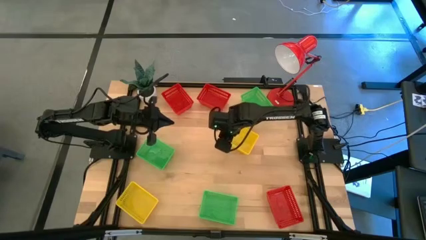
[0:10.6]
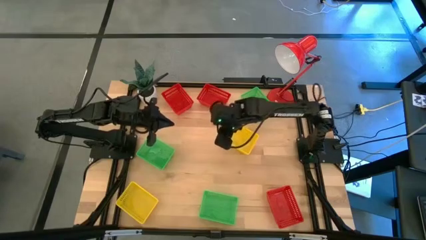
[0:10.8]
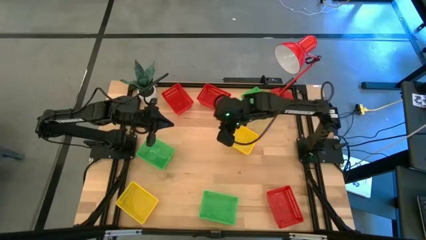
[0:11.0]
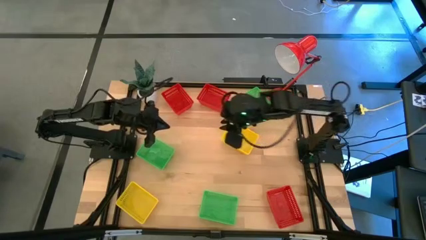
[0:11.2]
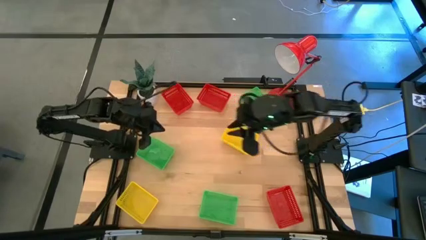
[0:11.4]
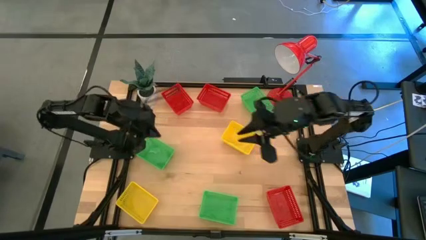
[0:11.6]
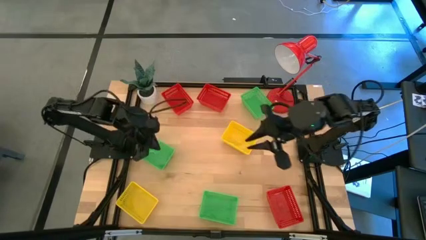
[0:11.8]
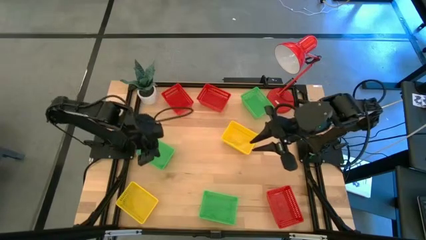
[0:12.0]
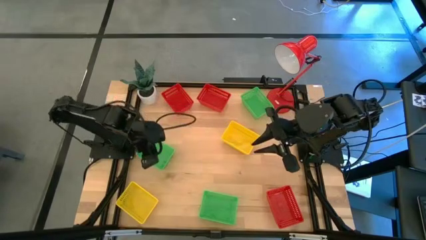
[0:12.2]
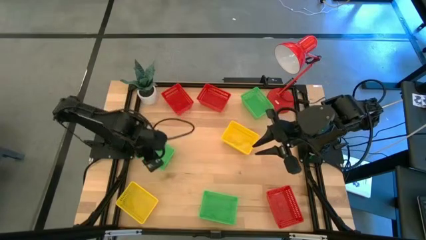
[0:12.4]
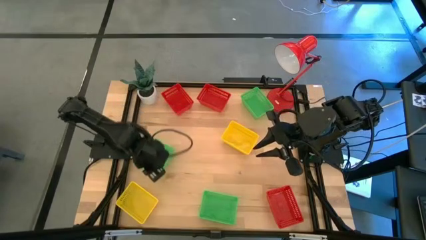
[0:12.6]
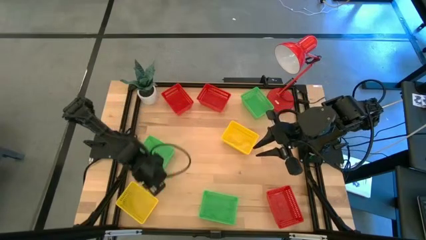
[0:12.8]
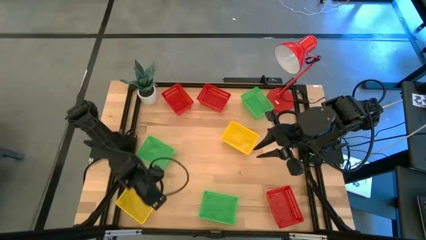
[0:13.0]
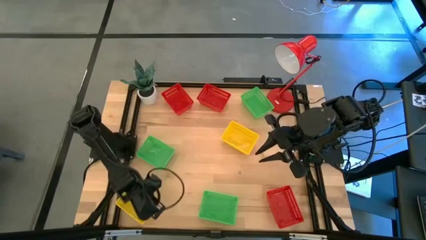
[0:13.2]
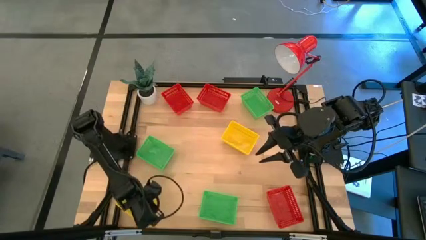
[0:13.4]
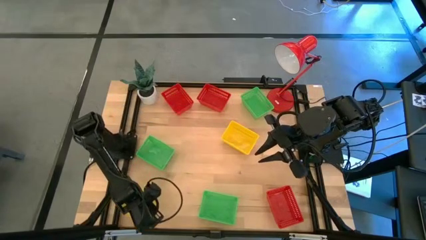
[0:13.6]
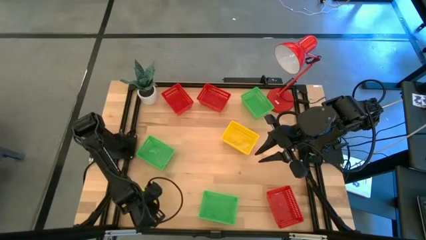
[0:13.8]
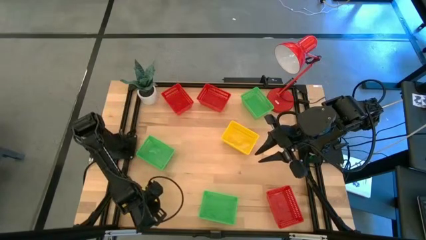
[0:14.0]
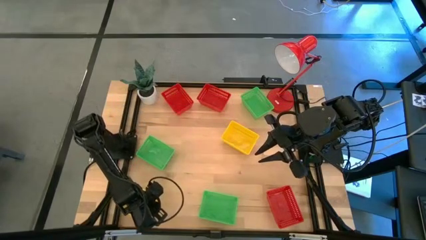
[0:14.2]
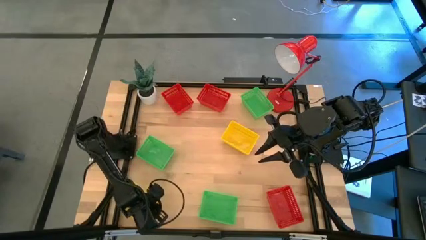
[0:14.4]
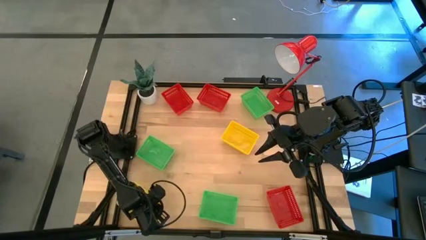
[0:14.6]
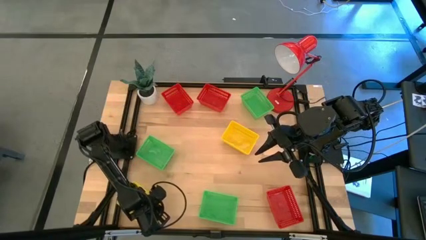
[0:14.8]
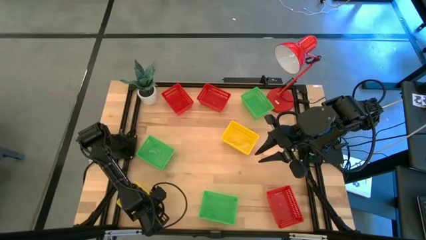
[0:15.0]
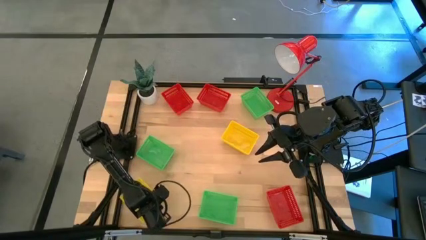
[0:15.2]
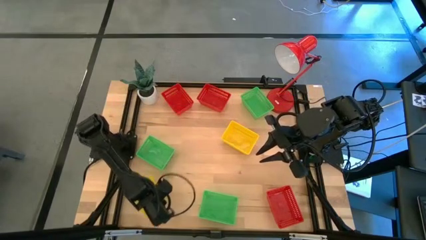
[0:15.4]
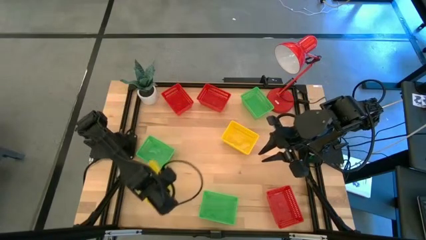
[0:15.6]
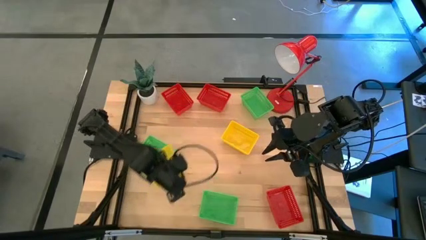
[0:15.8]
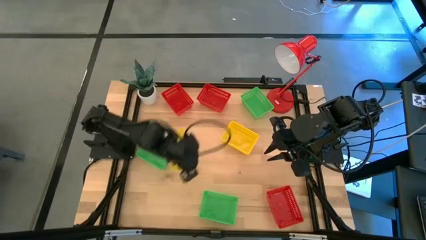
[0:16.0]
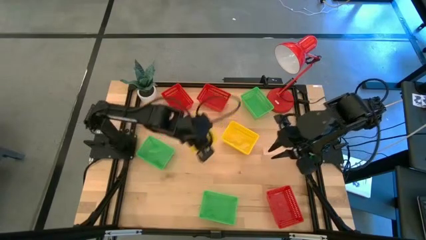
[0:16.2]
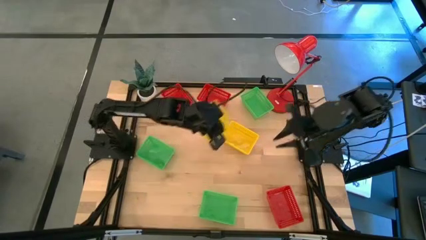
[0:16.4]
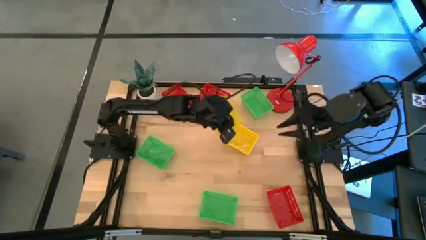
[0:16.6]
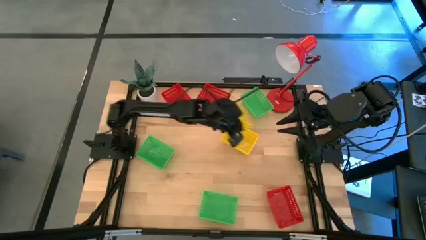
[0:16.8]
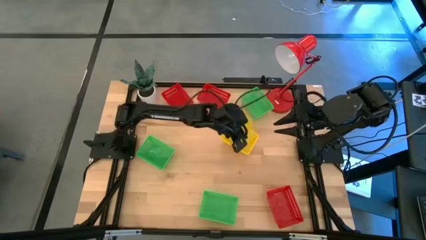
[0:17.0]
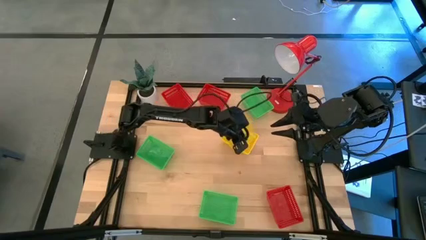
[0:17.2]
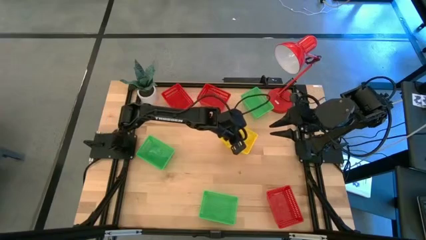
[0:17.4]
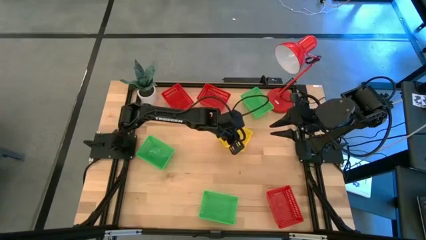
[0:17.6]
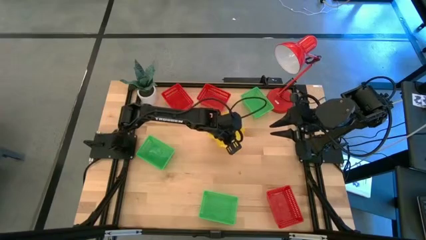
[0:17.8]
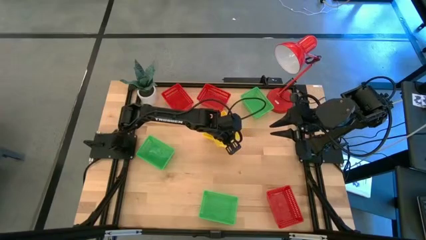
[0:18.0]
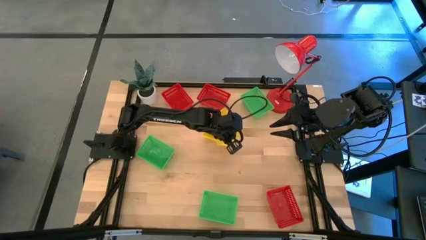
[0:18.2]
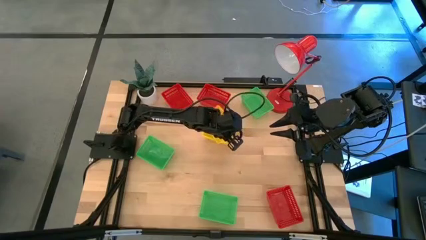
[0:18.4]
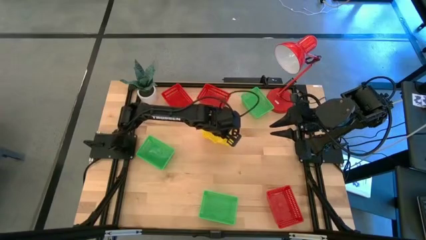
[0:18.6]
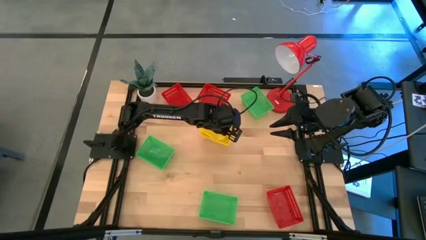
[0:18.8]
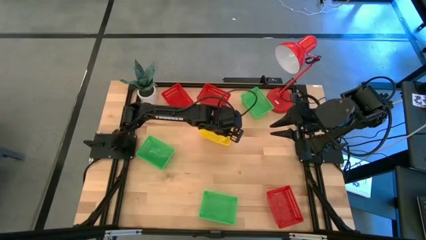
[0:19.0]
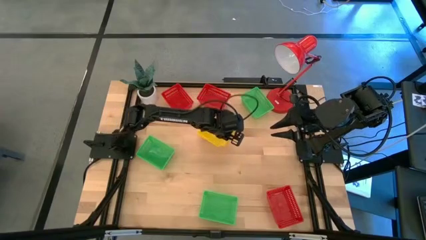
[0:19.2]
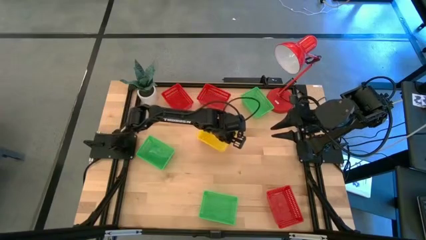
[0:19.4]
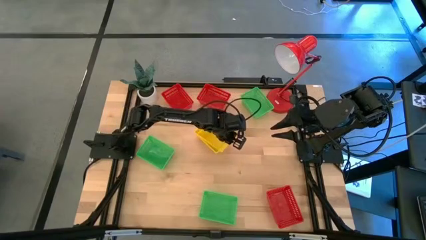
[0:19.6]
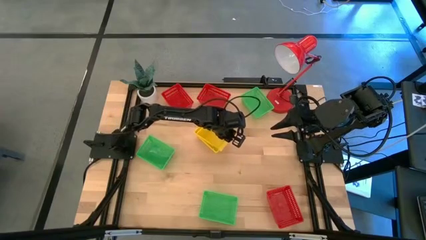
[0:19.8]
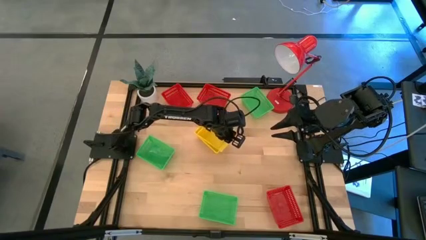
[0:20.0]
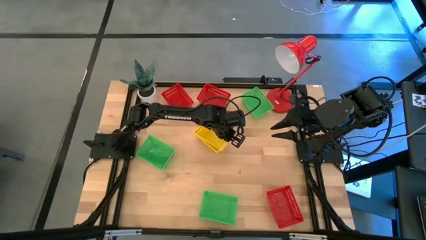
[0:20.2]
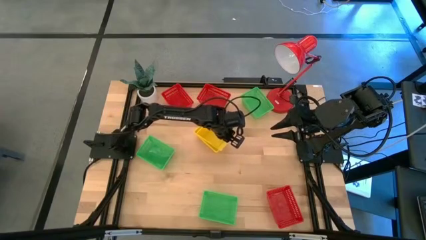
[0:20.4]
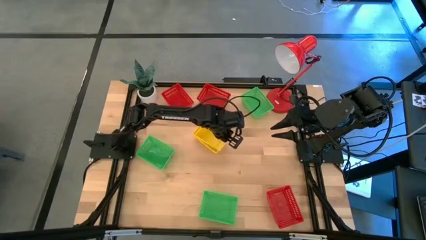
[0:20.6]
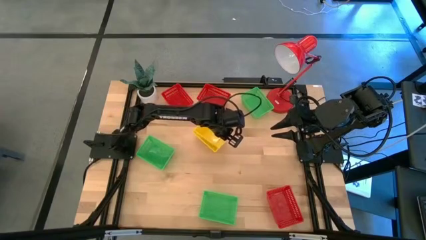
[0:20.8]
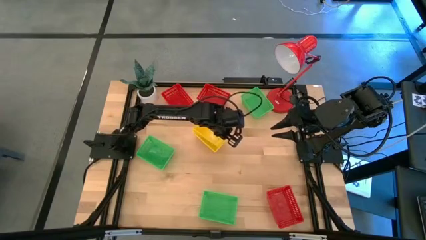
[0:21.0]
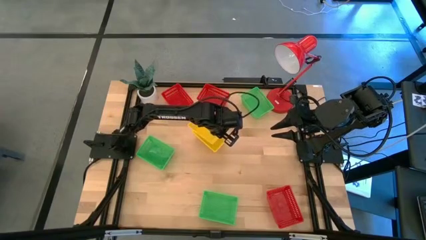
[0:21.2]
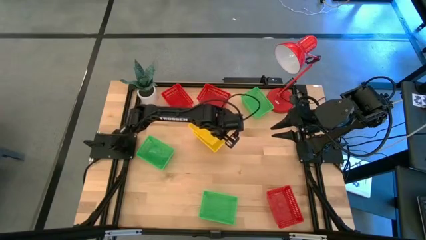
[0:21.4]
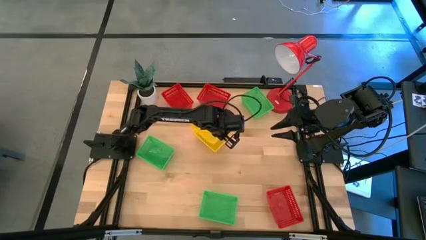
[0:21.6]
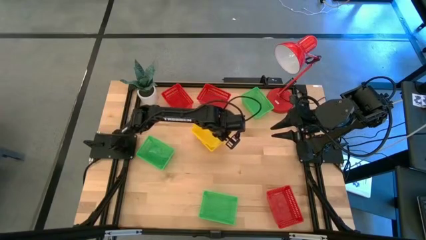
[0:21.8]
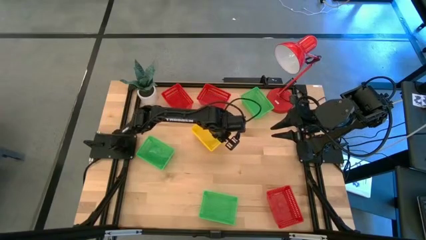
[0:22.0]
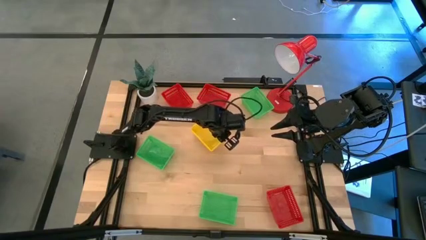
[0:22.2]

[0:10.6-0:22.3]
Stack the yellow bin on the yellow bin
